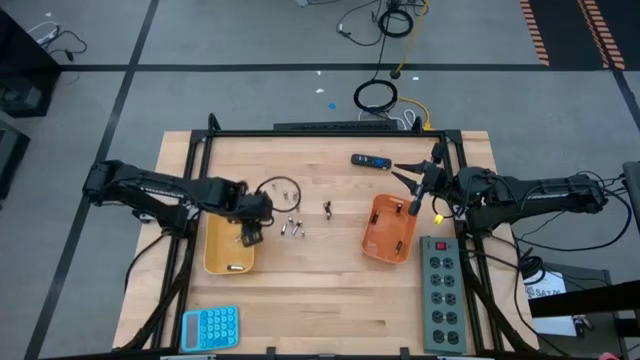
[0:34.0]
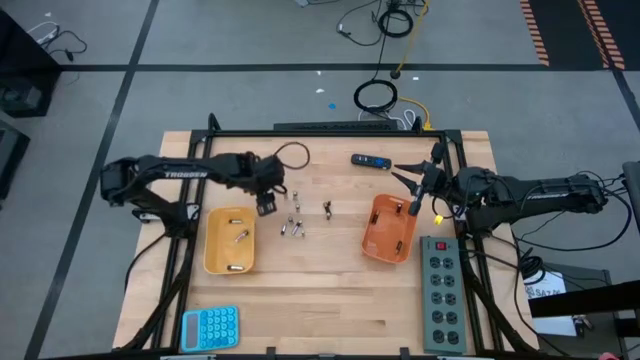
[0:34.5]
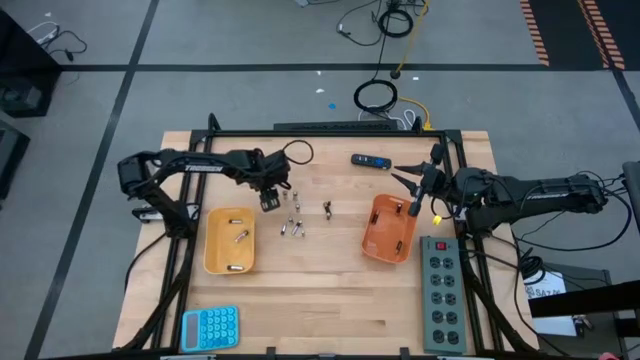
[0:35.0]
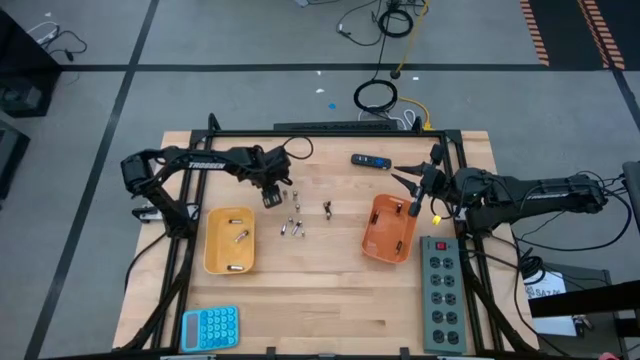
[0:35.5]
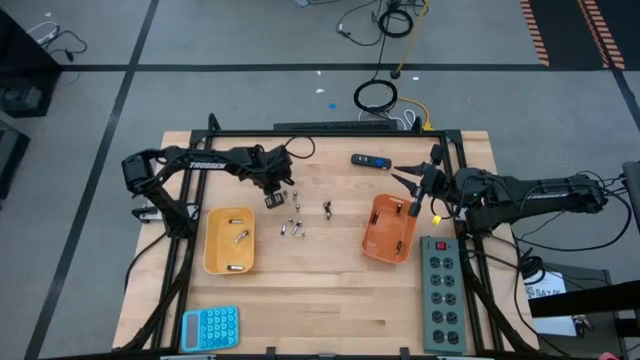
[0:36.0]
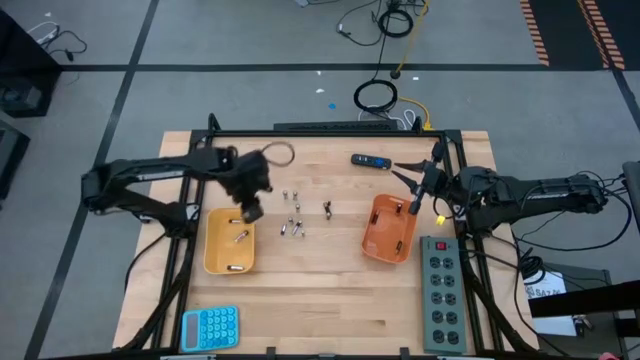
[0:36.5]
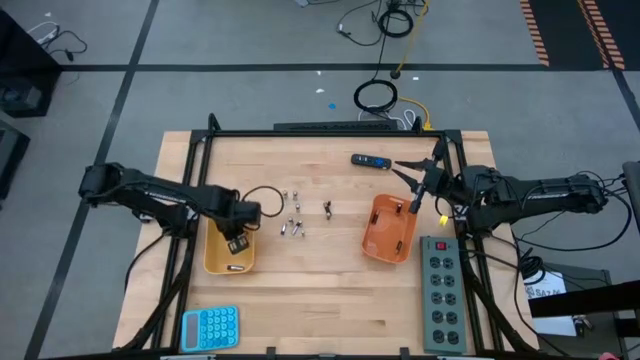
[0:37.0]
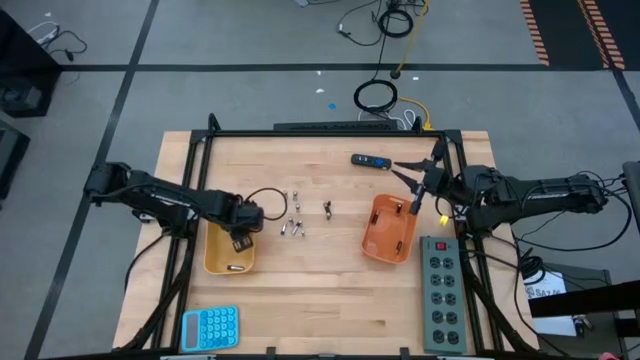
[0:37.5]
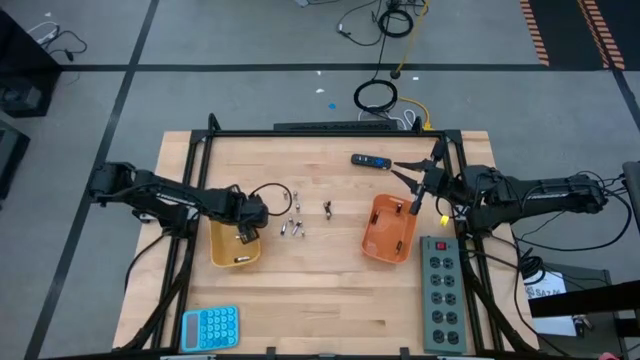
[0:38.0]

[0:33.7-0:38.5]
Task: Sort batteries
Put the silver battery into the yellow bin

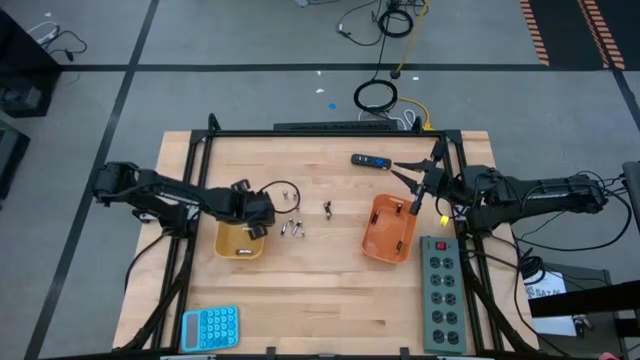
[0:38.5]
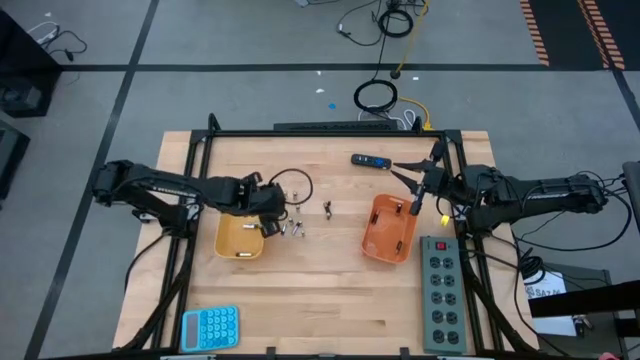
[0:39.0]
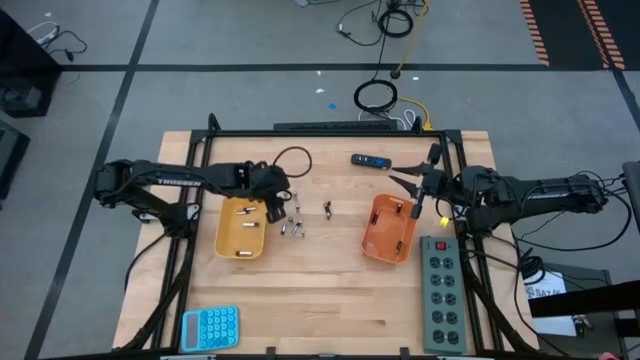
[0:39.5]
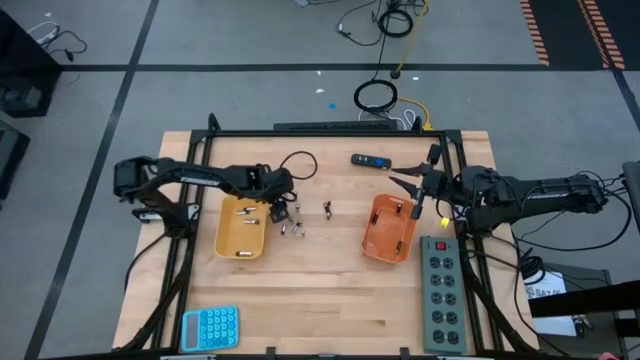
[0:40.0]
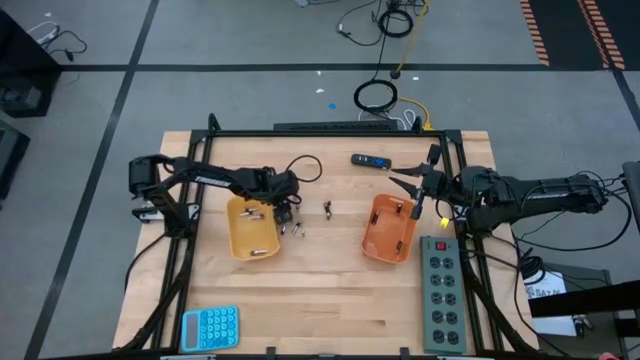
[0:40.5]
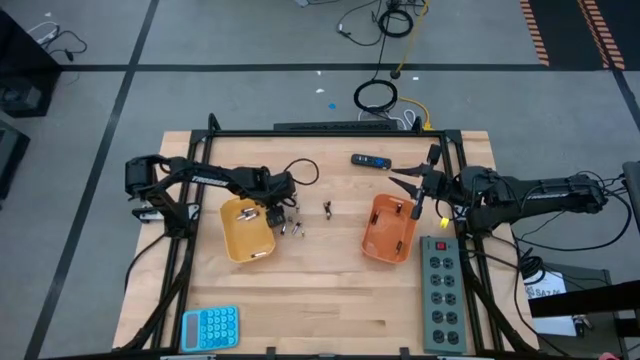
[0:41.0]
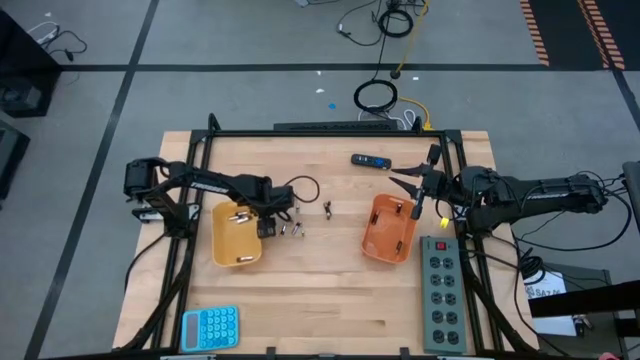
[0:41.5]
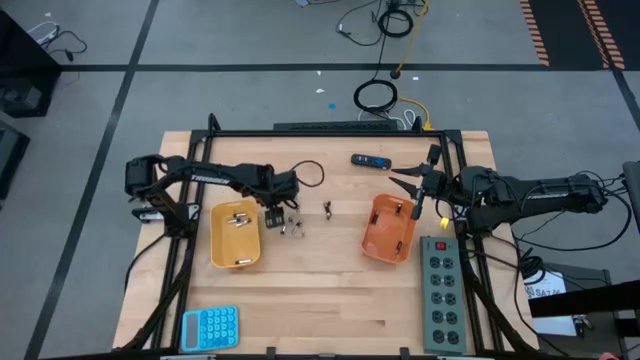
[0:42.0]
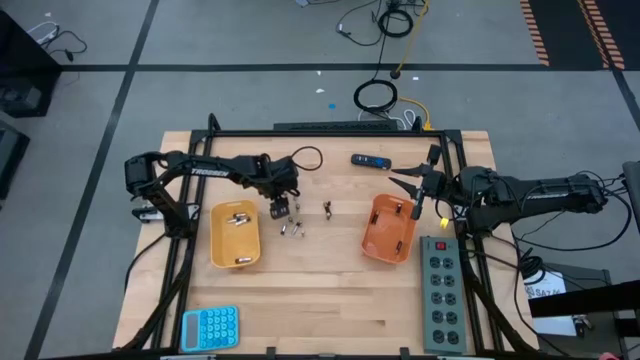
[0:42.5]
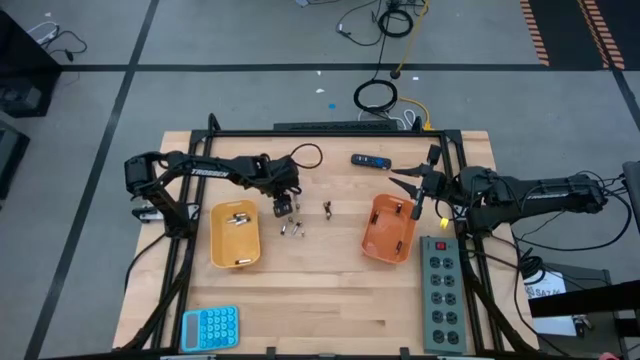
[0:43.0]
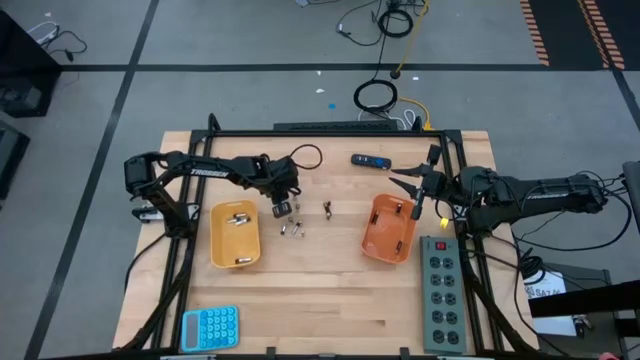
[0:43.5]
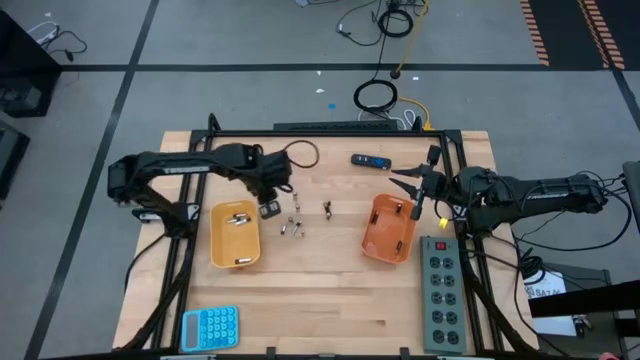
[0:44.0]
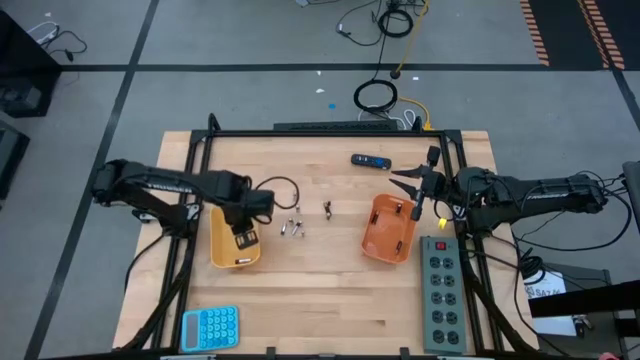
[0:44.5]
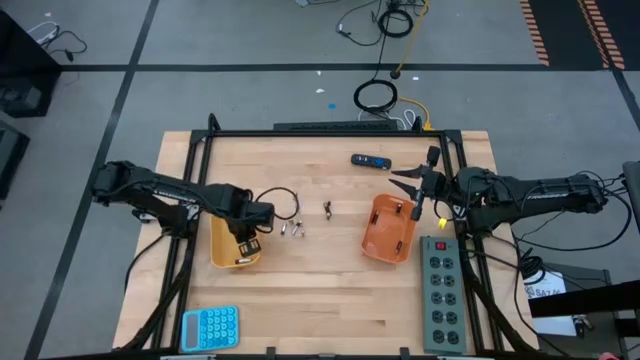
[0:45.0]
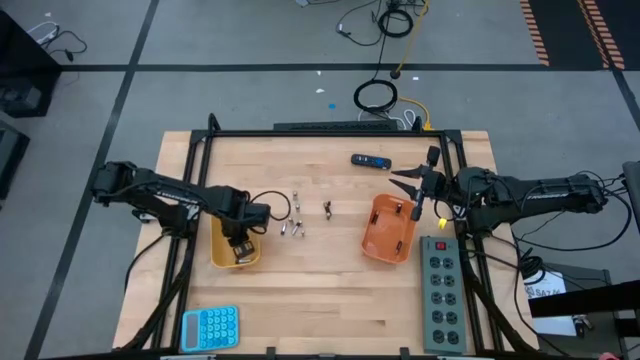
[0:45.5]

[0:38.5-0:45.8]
Put the silver battery into the yellow bin

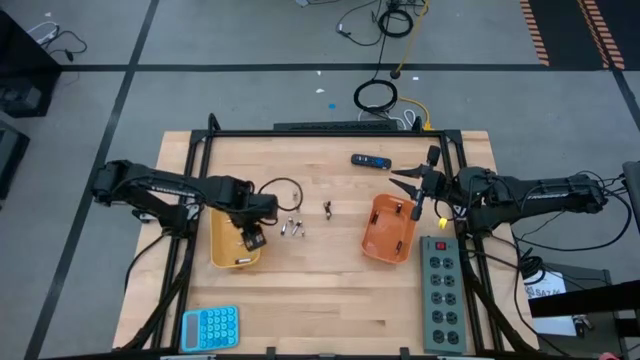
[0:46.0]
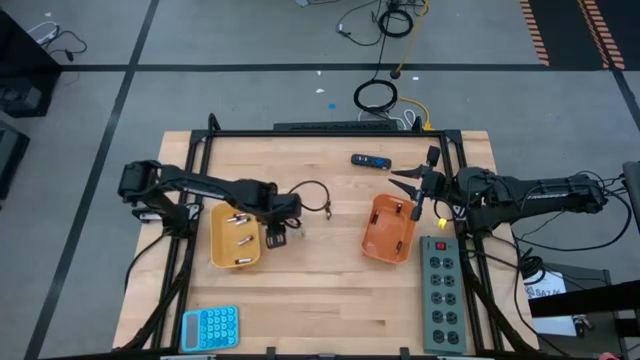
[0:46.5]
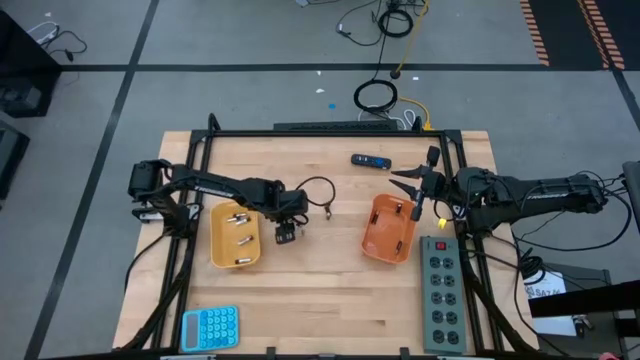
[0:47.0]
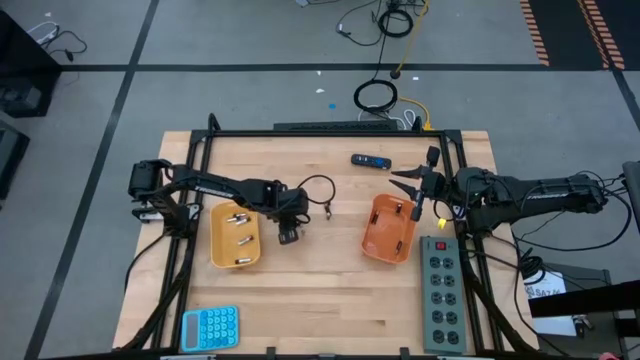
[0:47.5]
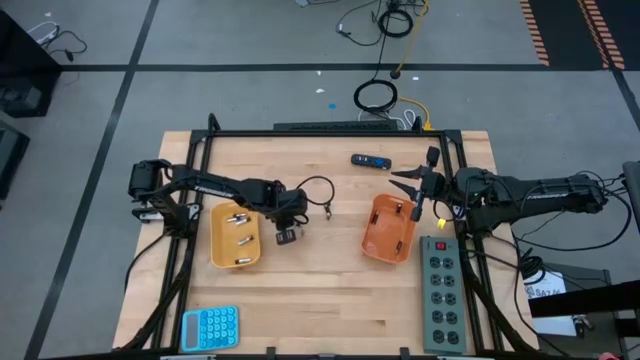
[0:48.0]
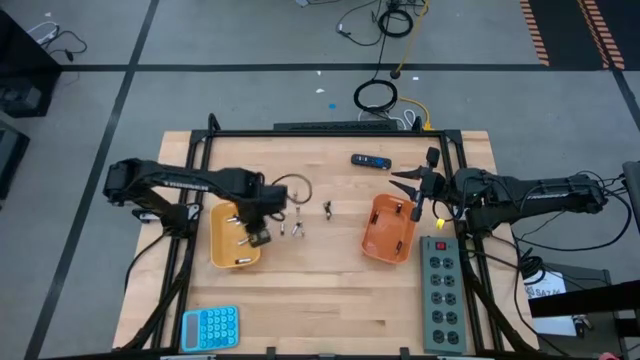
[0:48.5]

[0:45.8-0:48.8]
Put the silver battery into the yellow bin

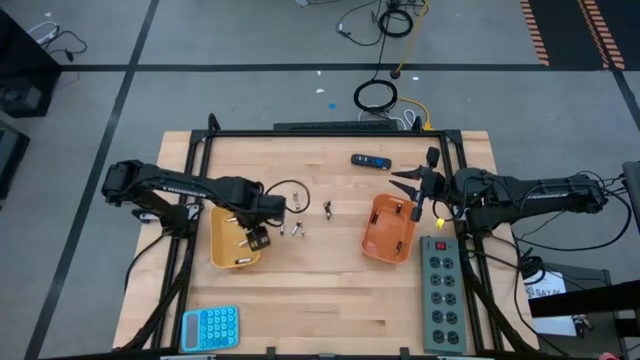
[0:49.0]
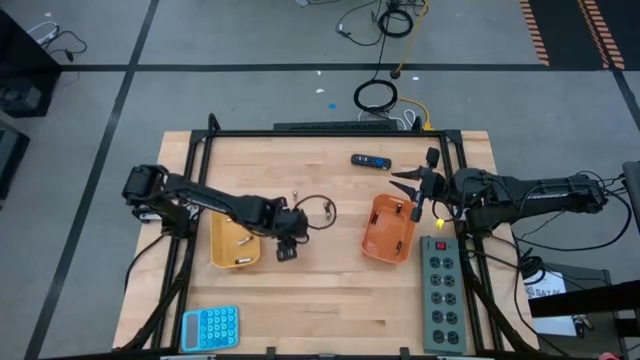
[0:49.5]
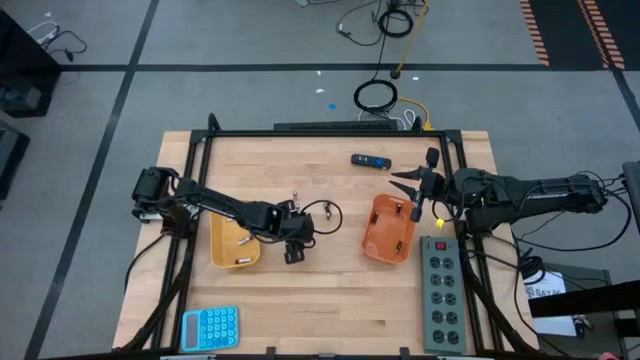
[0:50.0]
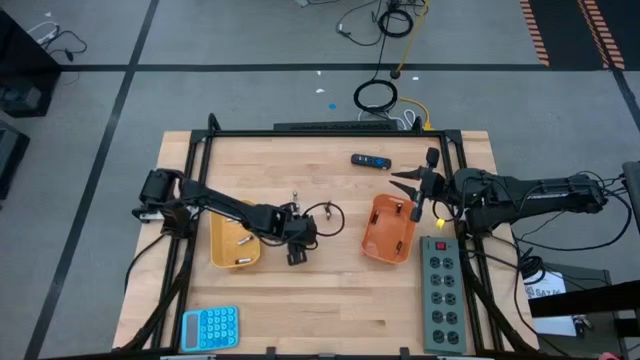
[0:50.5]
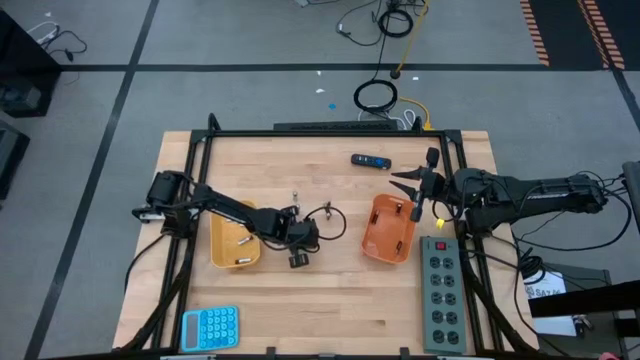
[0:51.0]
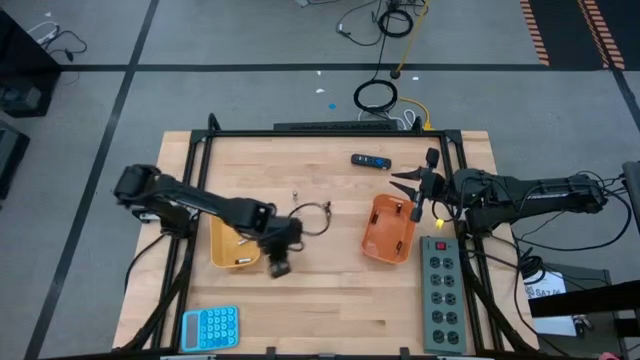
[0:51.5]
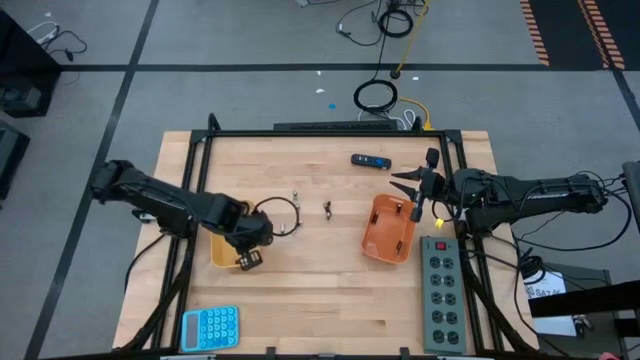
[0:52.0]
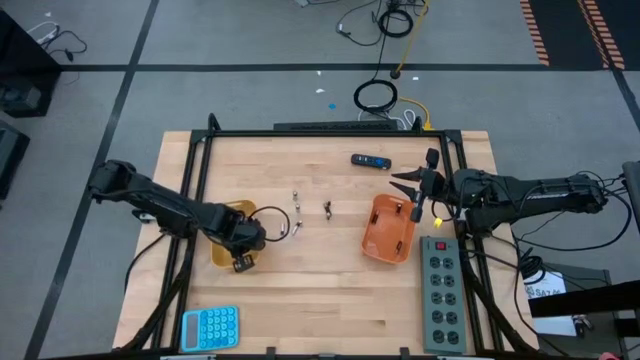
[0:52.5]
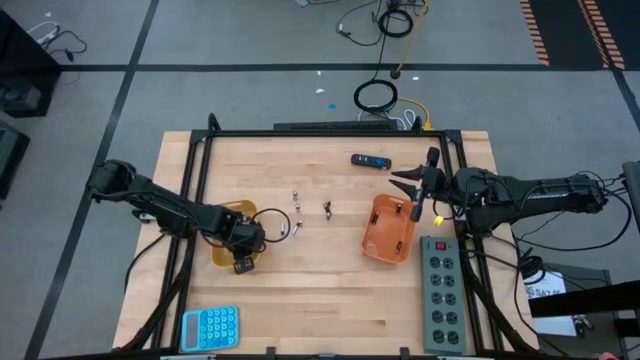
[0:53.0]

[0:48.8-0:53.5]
Put the silver battery into the yellow bin

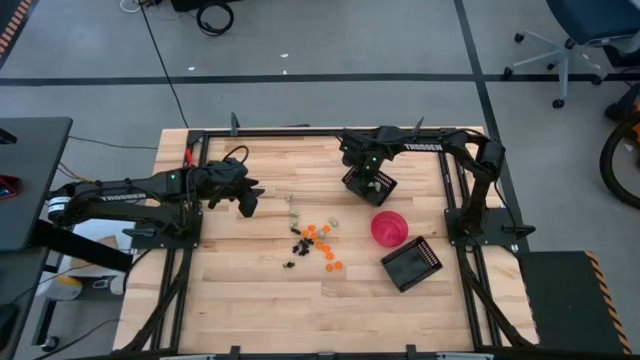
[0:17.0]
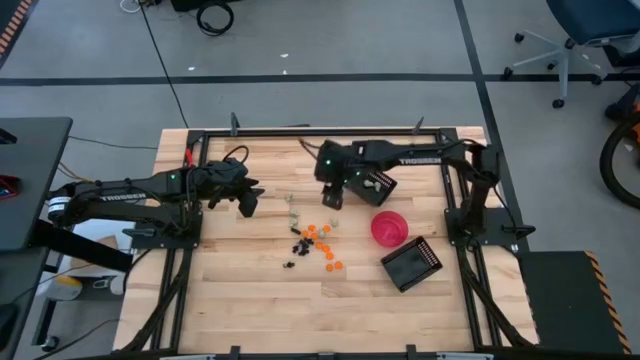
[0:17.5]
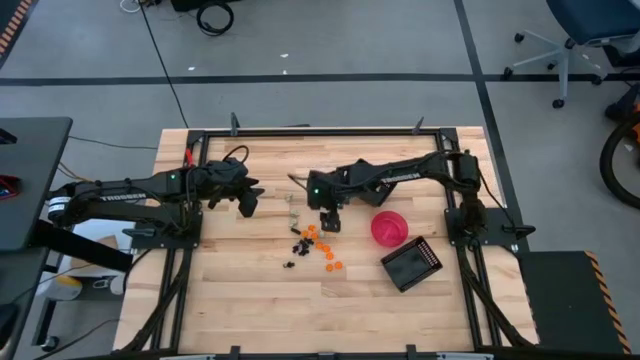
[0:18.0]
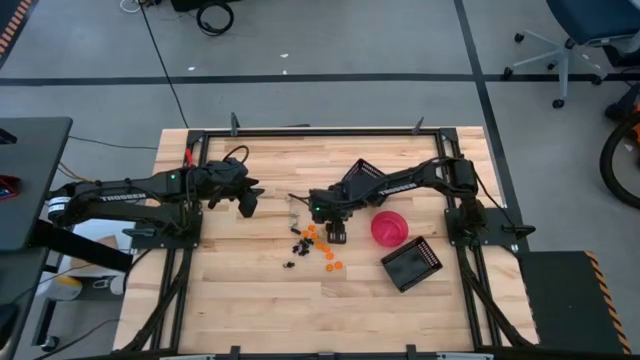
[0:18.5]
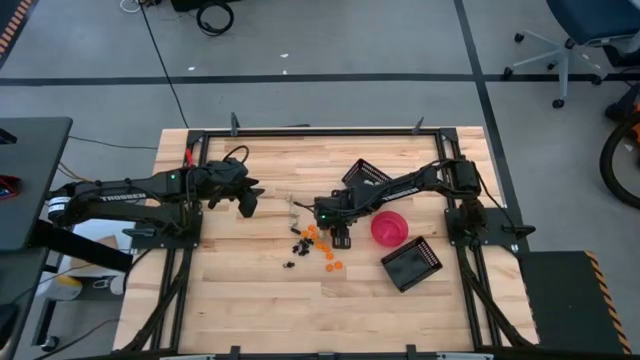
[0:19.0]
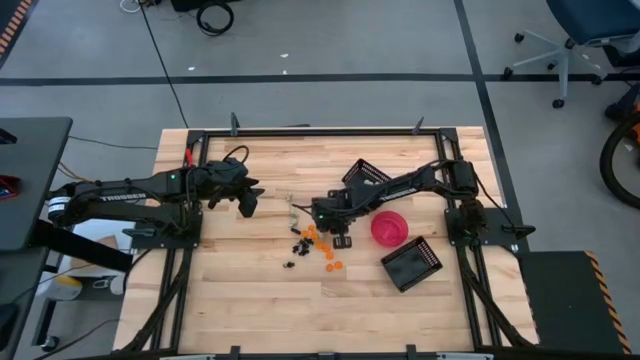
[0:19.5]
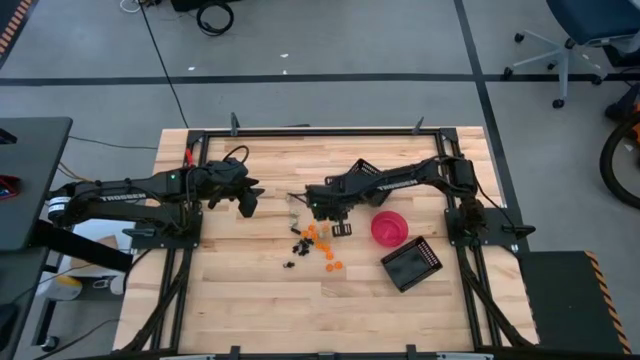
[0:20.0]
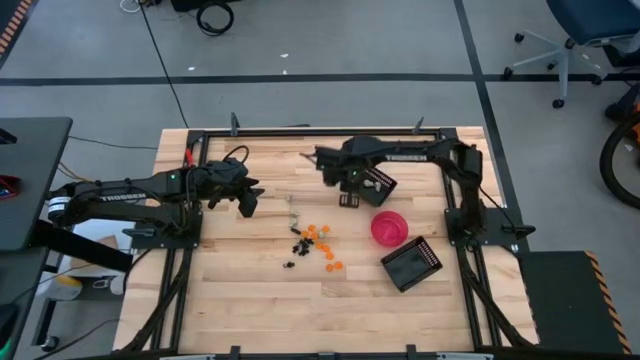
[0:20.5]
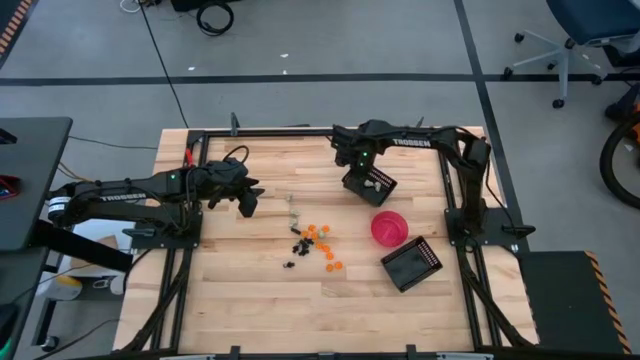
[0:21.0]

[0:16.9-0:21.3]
Task: Sort Halloween decoration
Put the white skull toy into the top black basket
